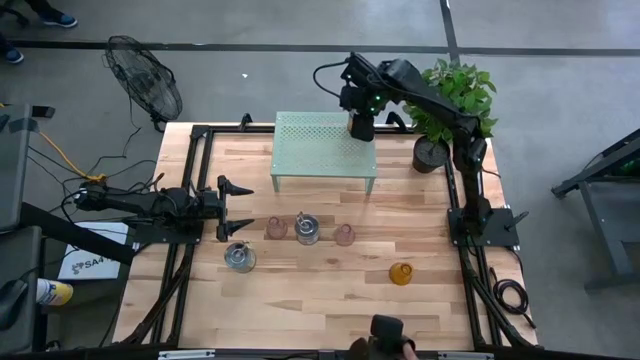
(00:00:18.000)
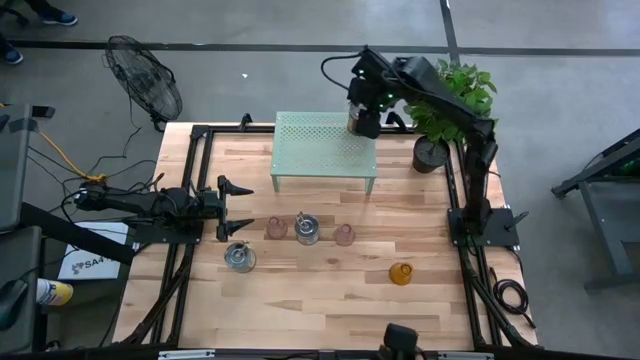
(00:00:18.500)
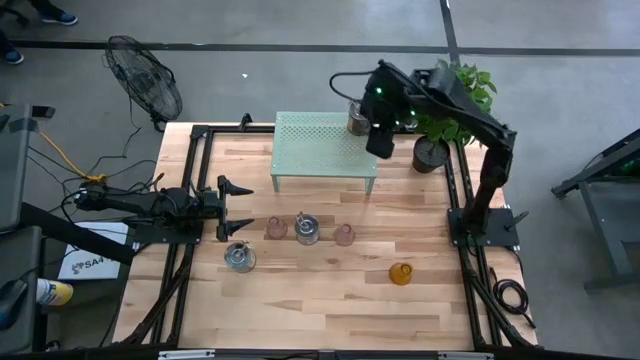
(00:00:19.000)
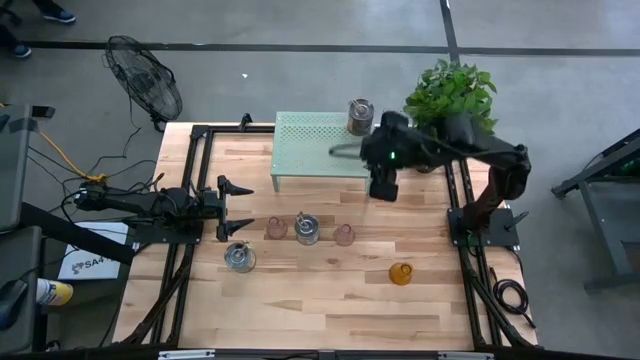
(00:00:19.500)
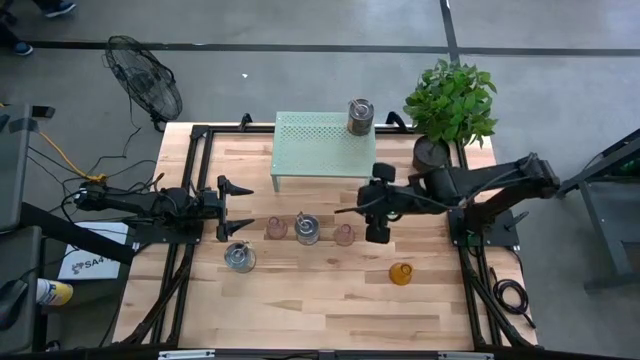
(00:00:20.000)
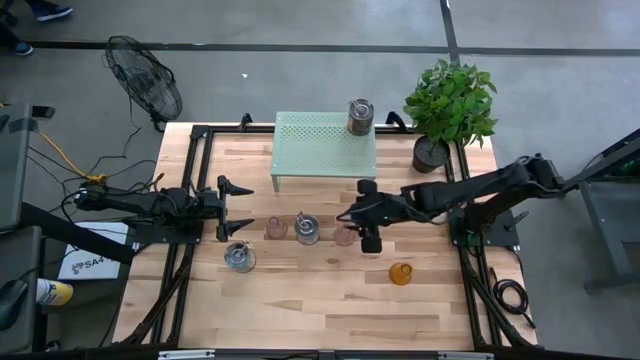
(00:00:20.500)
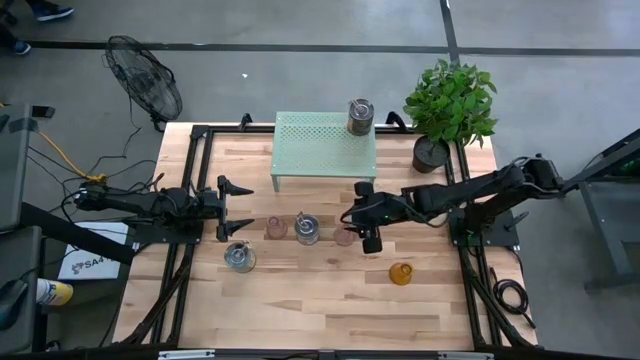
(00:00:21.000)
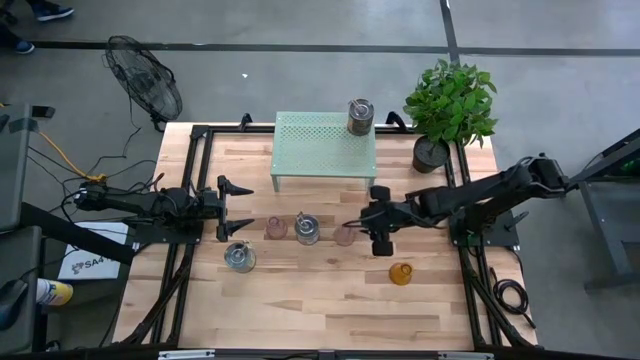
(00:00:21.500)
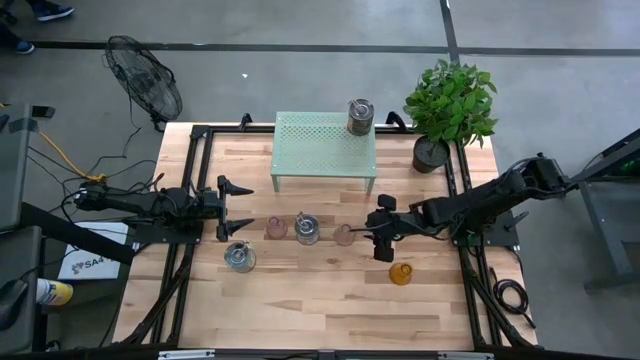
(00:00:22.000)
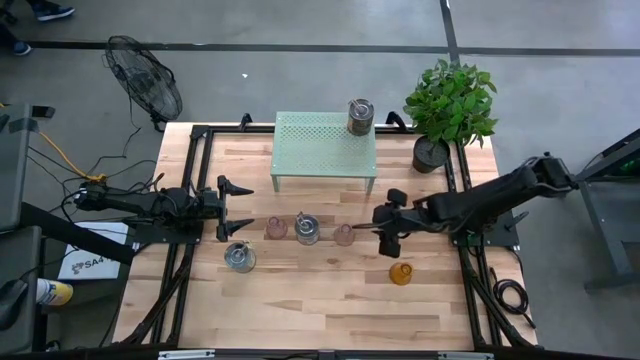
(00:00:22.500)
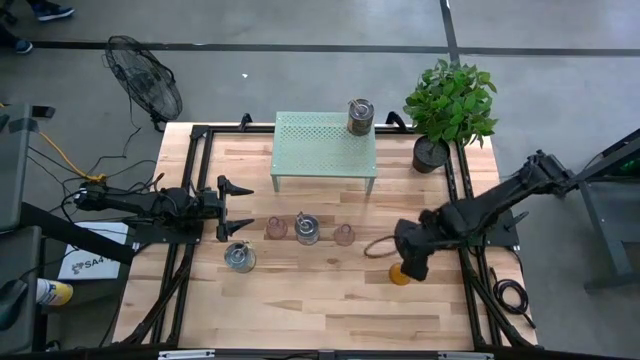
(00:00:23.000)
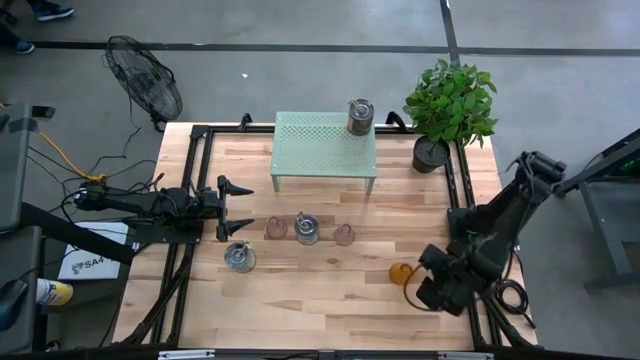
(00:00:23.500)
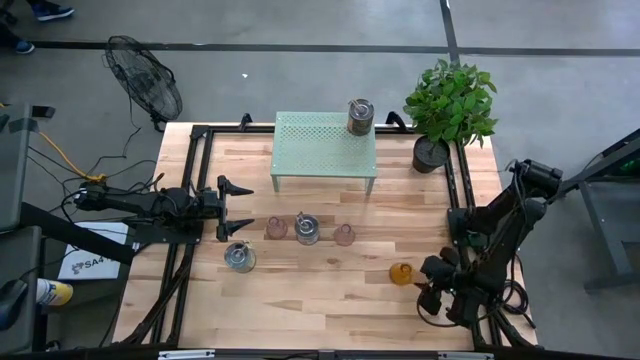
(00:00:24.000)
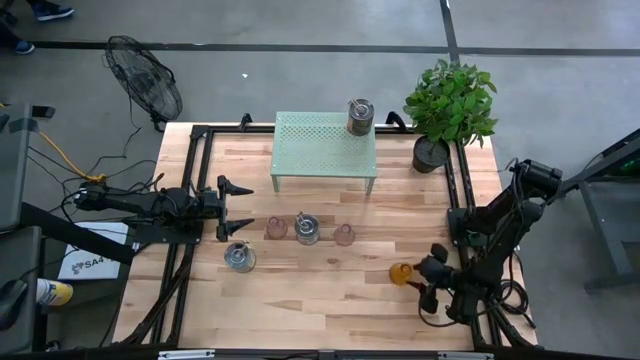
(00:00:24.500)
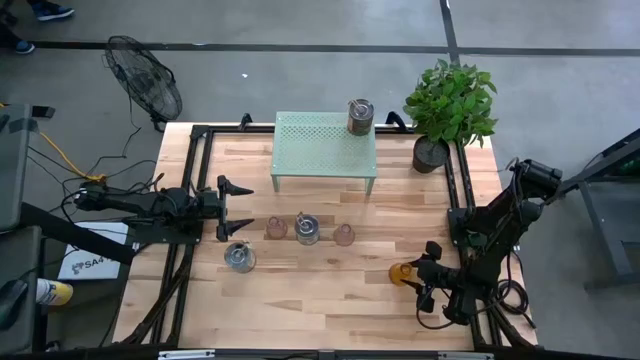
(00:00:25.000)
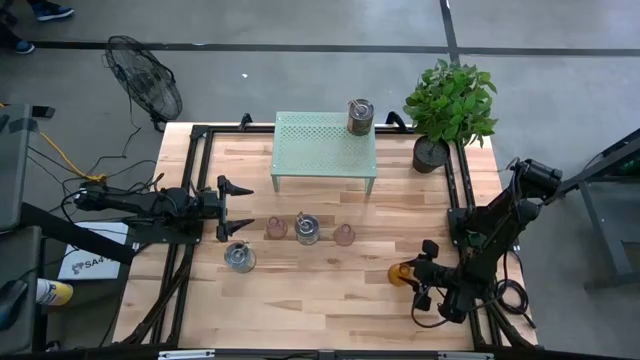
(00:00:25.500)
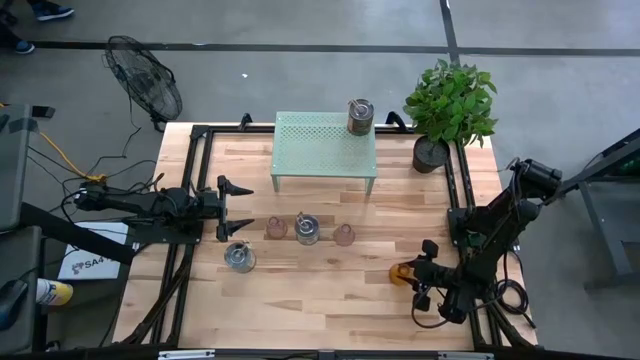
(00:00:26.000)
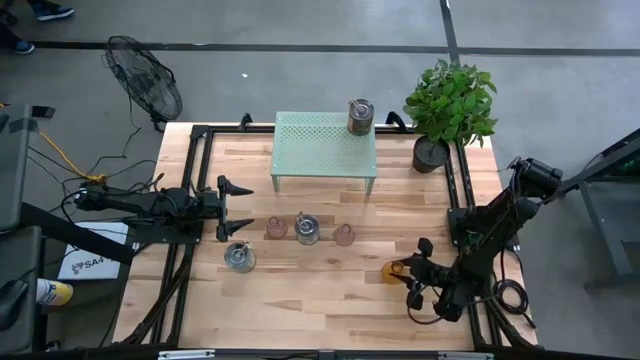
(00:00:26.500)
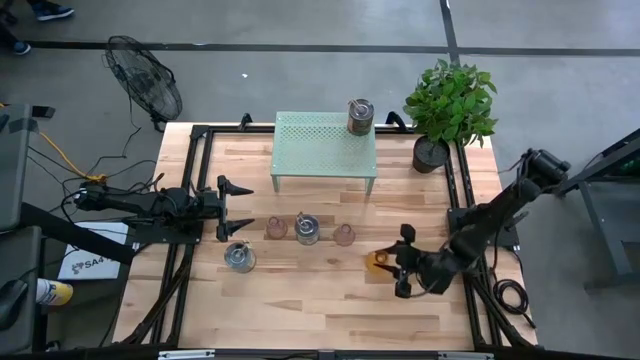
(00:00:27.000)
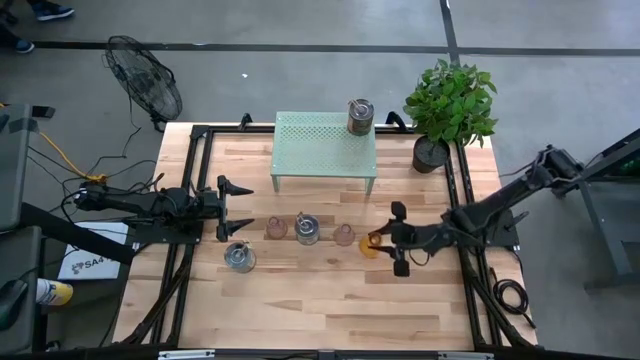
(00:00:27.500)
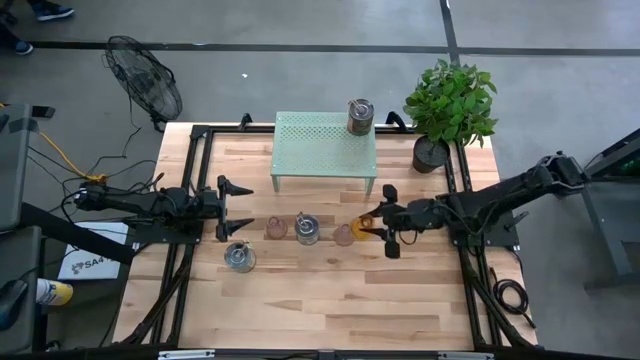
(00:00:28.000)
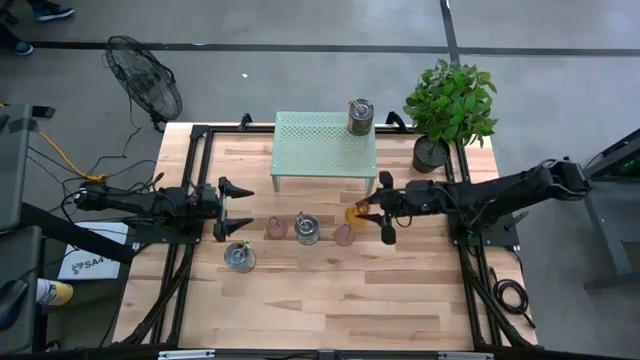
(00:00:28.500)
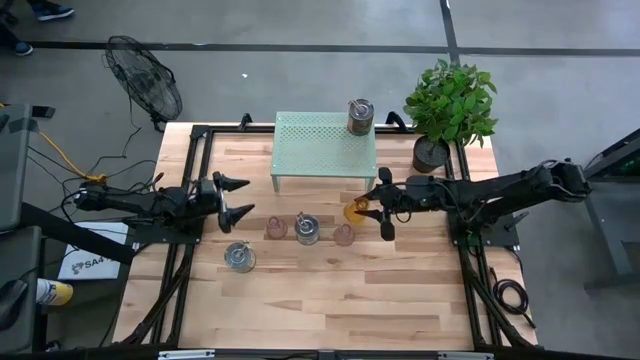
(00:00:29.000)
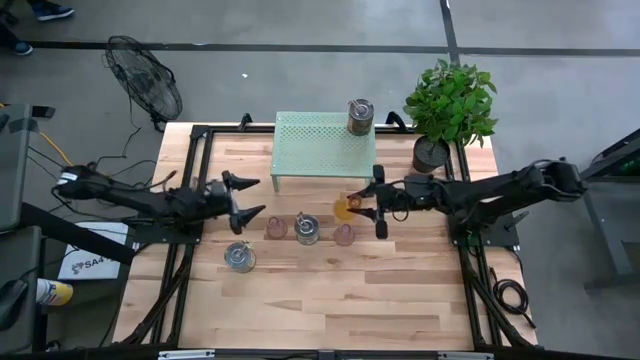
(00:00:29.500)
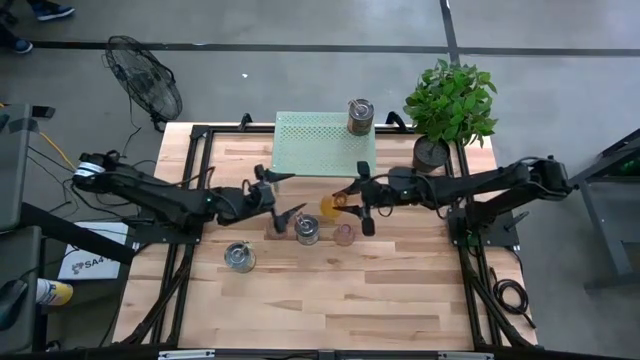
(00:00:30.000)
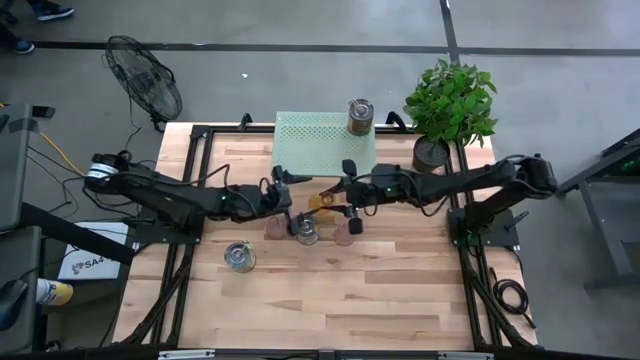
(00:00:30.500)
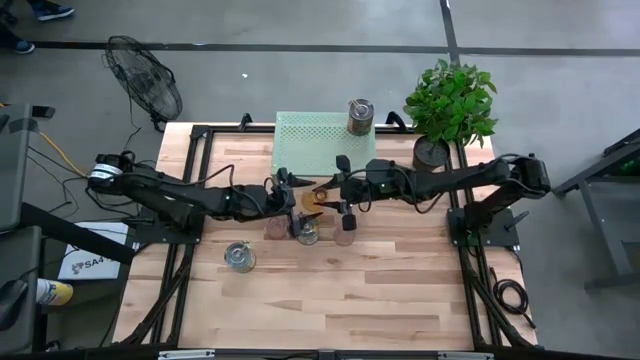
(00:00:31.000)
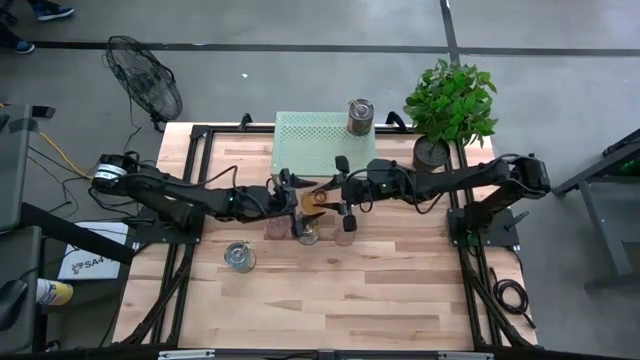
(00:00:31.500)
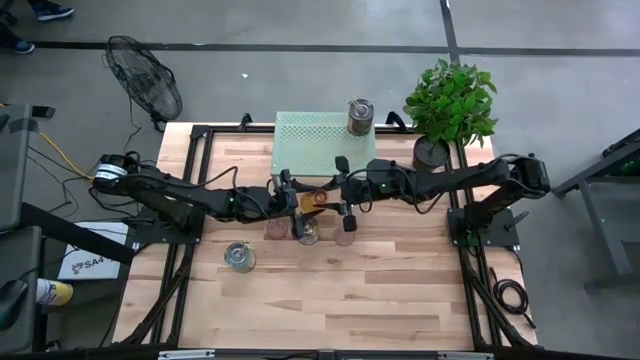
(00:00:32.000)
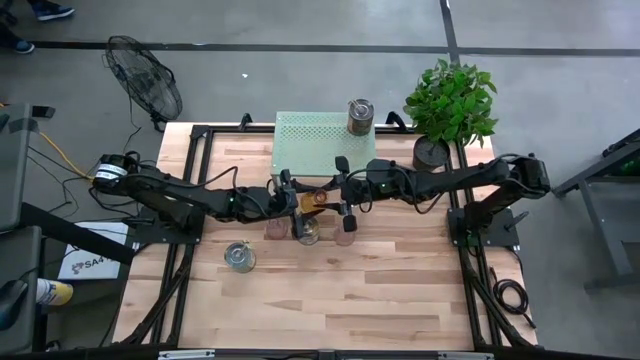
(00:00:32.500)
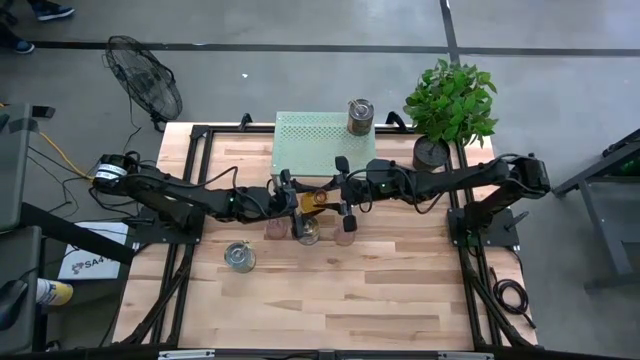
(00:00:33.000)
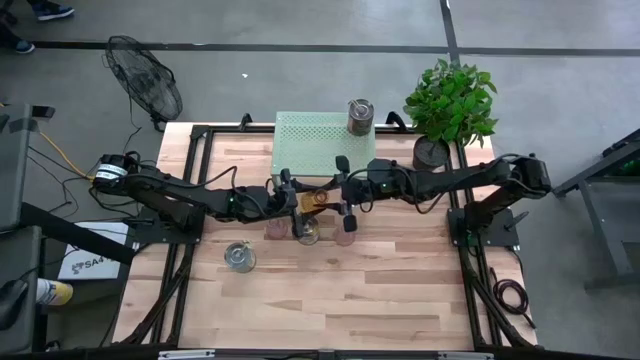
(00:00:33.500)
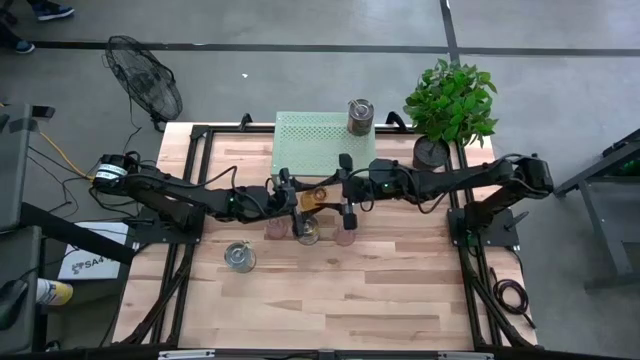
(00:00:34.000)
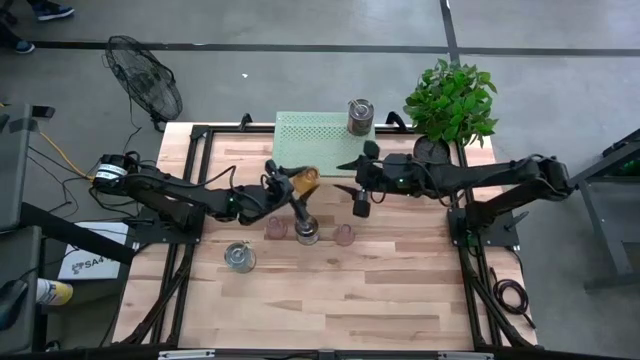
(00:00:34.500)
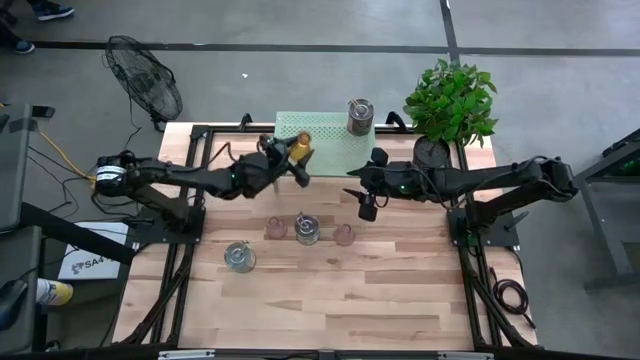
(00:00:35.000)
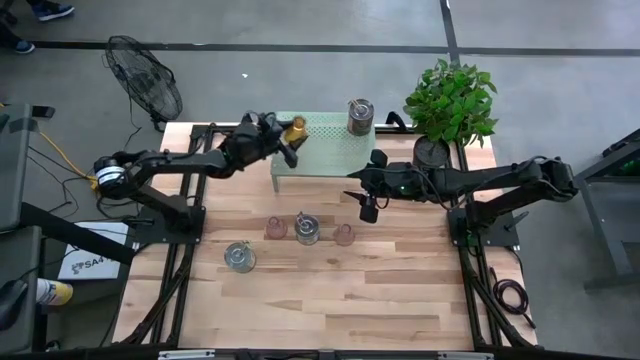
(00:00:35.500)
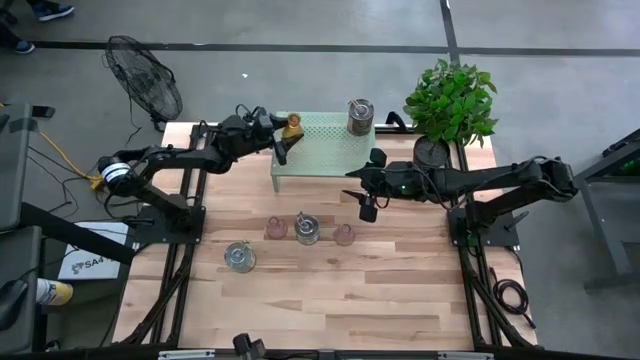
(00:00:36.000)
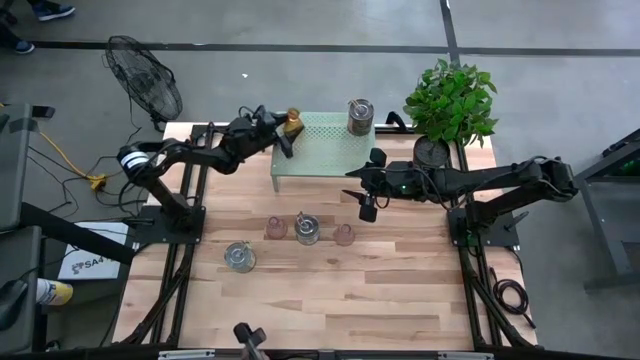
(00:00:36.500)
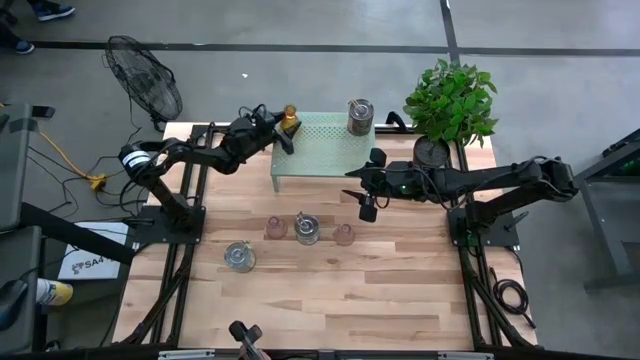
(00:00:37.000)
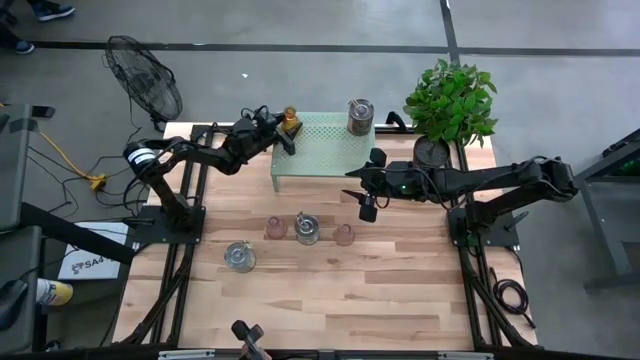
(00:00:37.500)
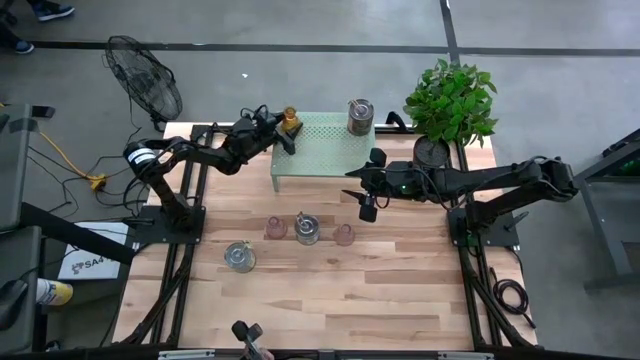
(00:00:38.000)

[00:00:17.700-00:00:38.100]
Task: Pick & Place candle stick holders
Put the yellow candle holder on the shelf
